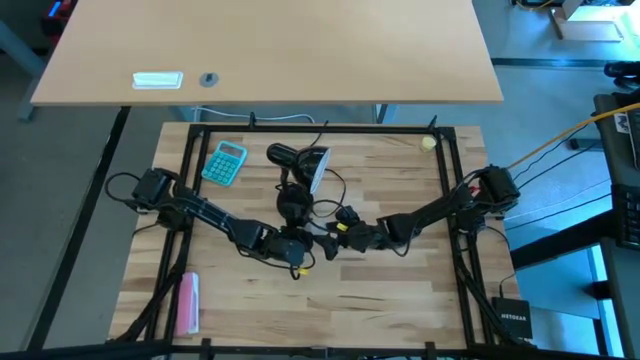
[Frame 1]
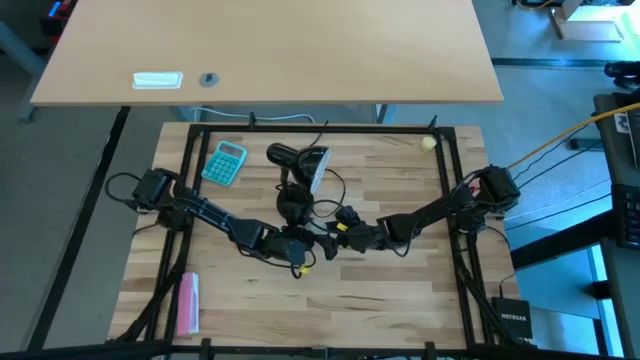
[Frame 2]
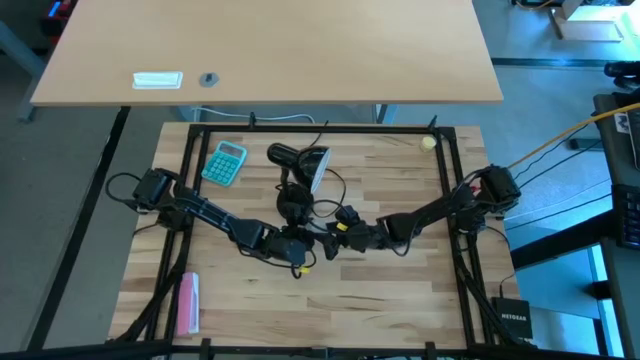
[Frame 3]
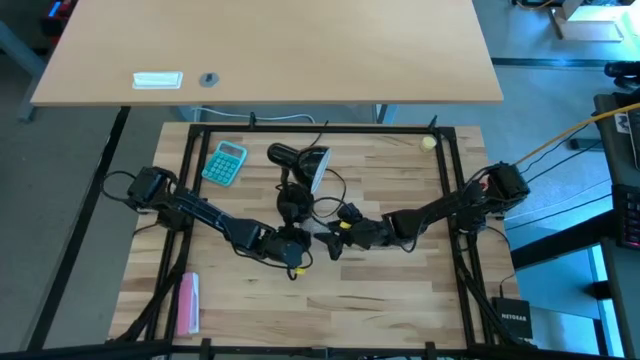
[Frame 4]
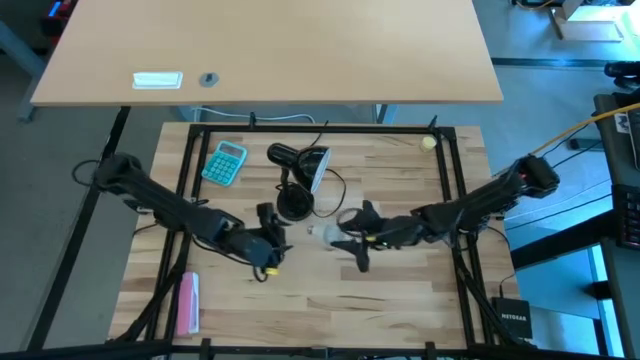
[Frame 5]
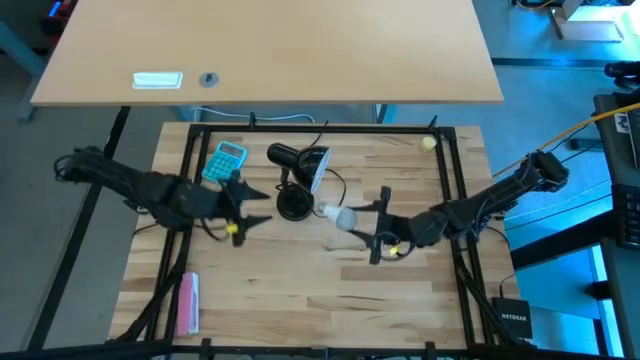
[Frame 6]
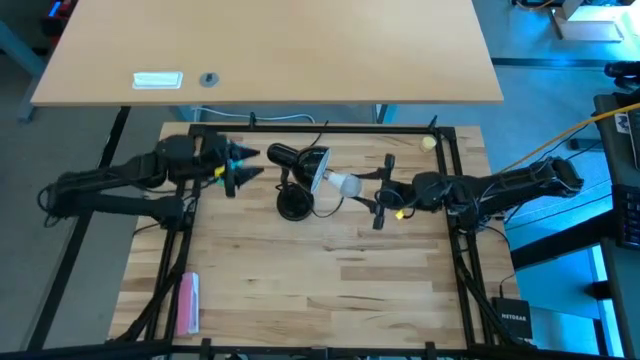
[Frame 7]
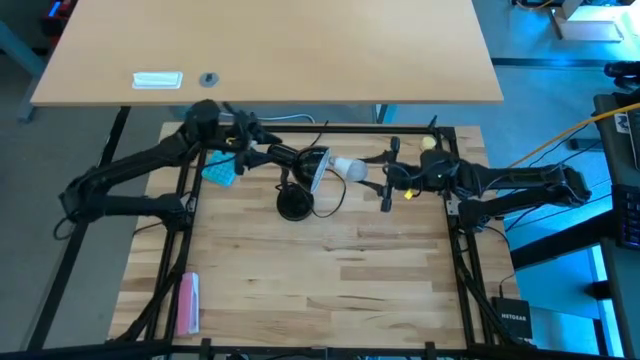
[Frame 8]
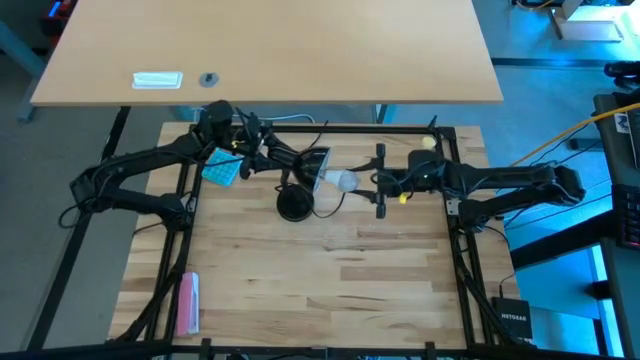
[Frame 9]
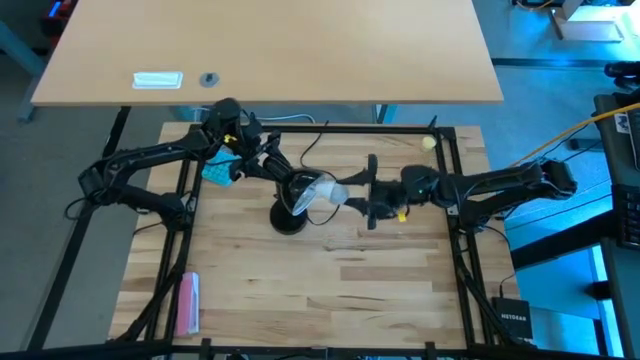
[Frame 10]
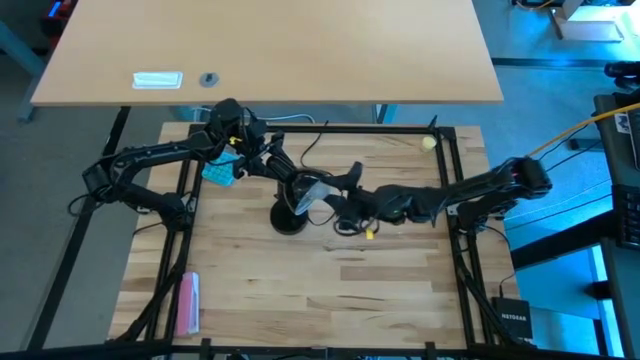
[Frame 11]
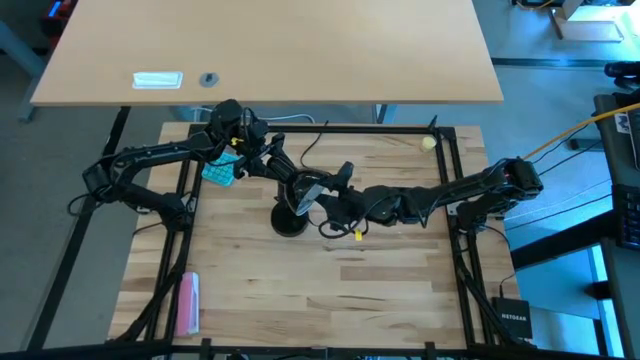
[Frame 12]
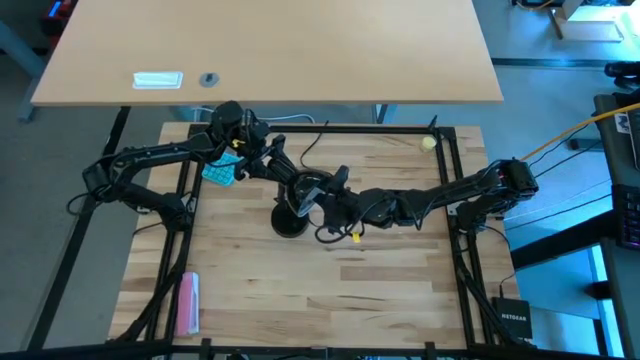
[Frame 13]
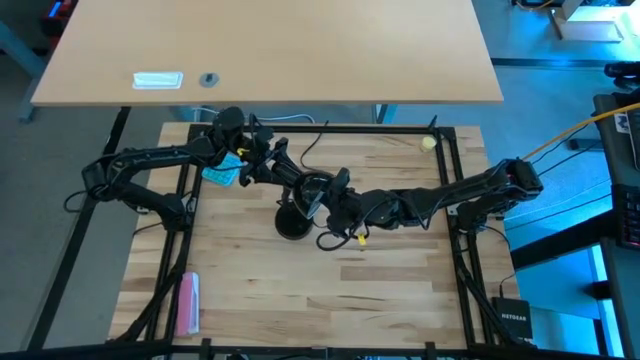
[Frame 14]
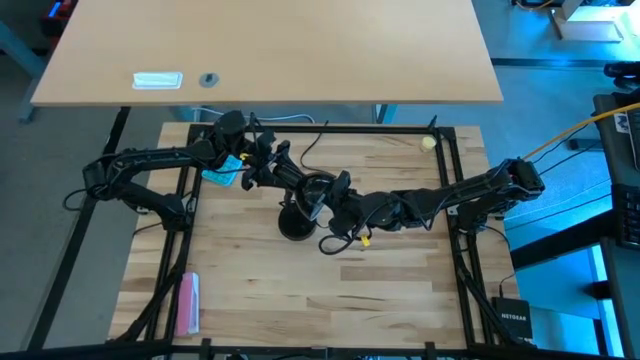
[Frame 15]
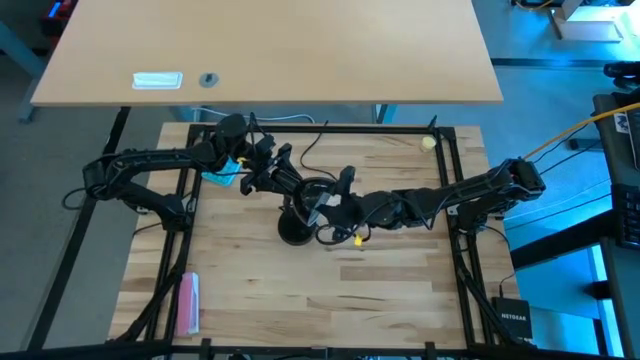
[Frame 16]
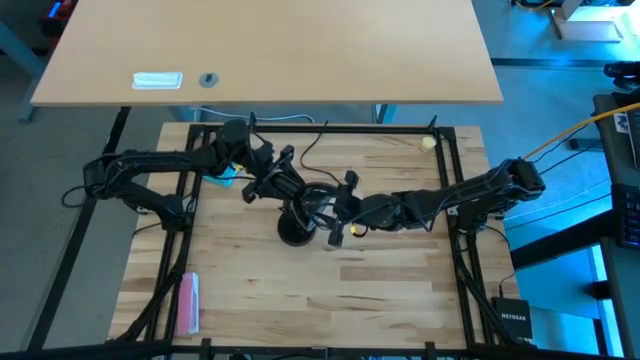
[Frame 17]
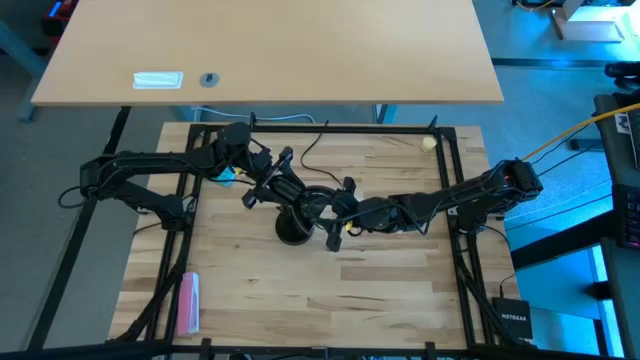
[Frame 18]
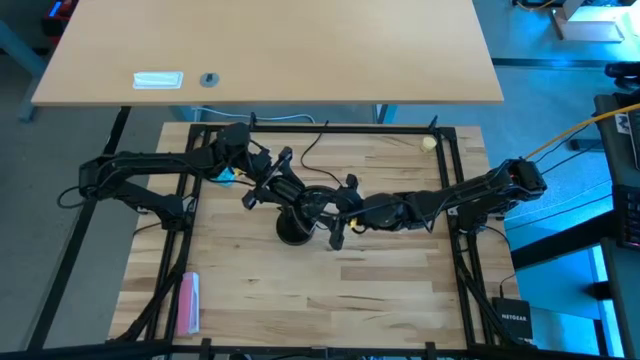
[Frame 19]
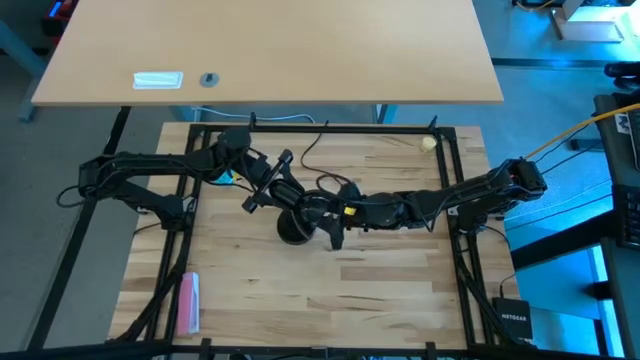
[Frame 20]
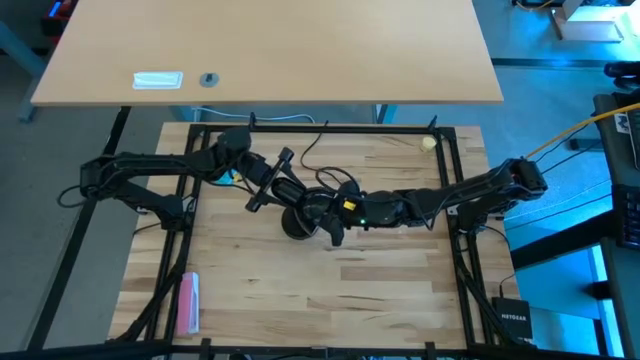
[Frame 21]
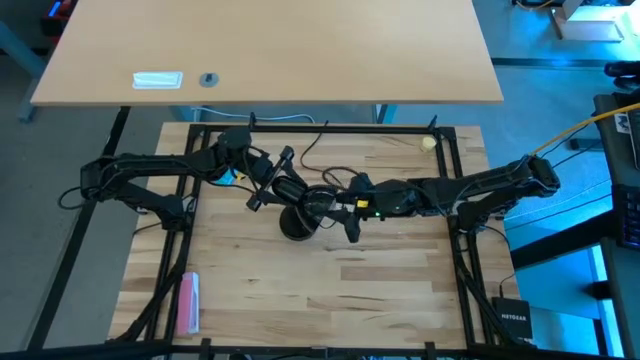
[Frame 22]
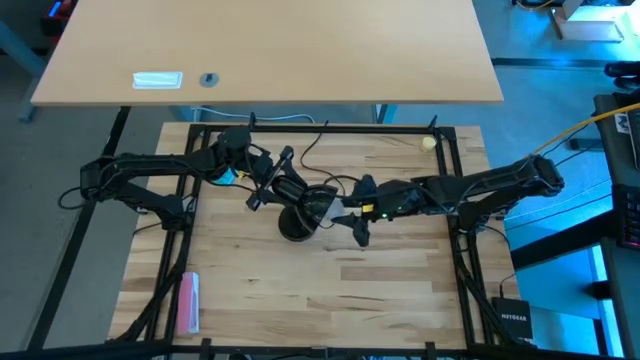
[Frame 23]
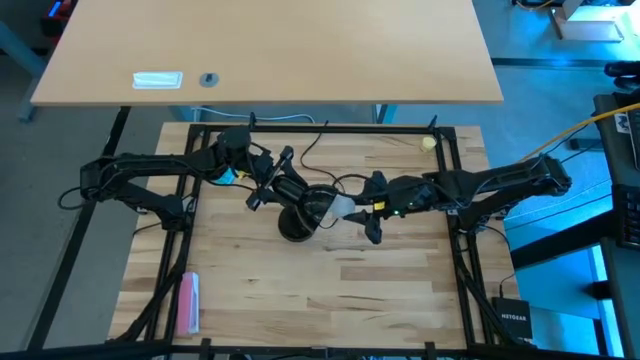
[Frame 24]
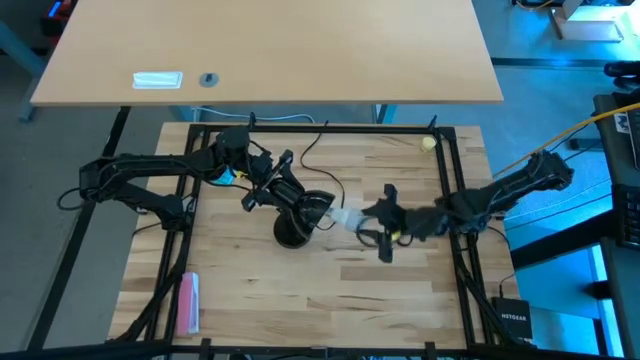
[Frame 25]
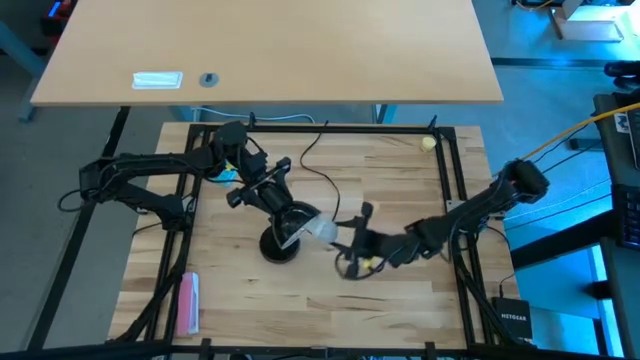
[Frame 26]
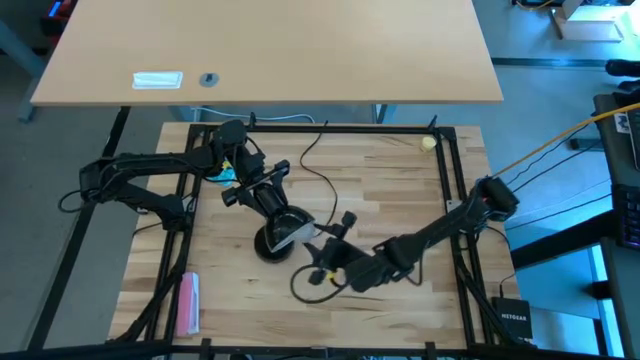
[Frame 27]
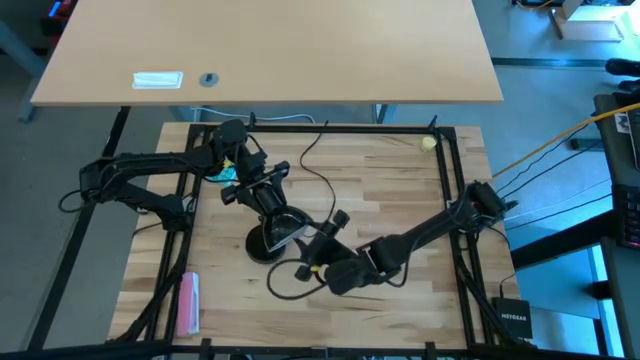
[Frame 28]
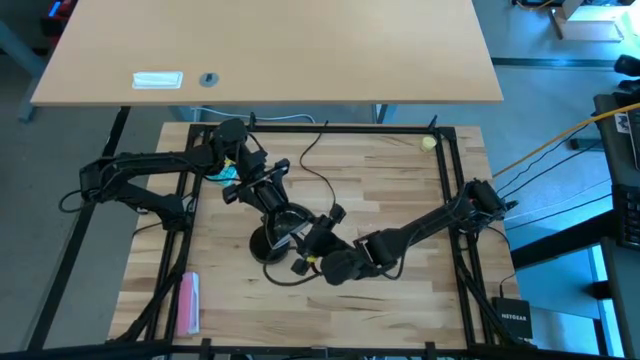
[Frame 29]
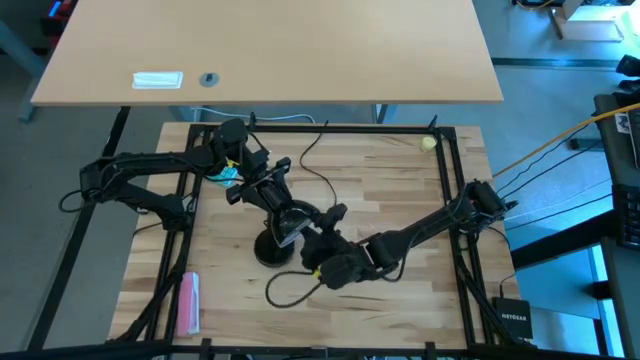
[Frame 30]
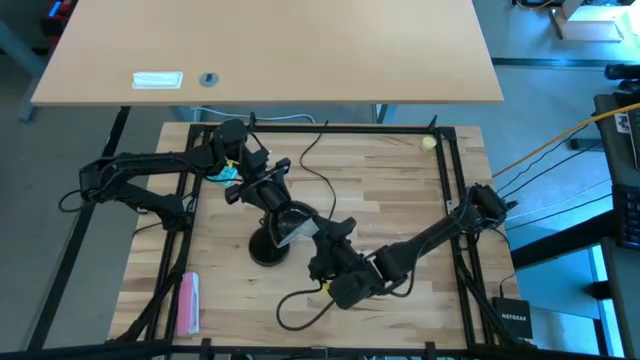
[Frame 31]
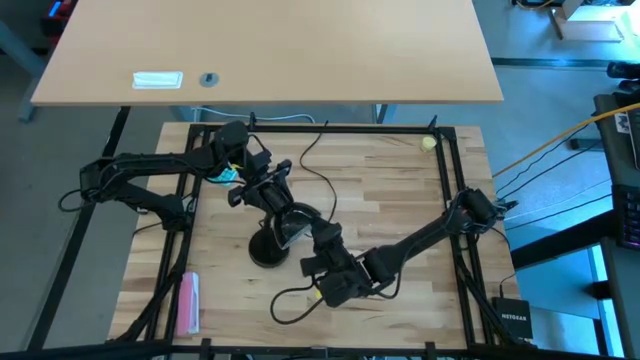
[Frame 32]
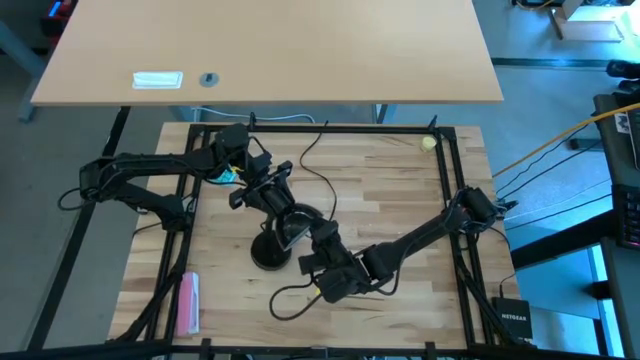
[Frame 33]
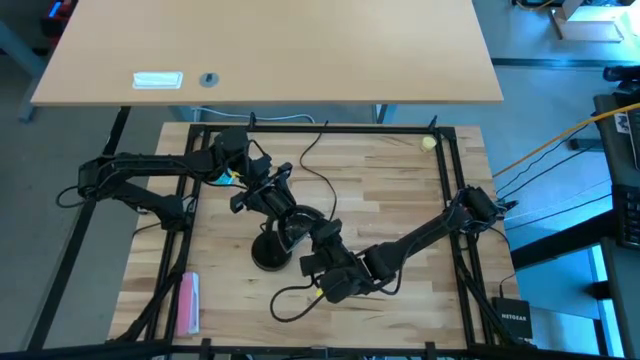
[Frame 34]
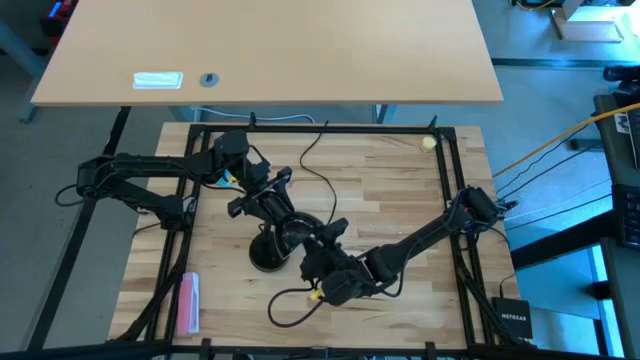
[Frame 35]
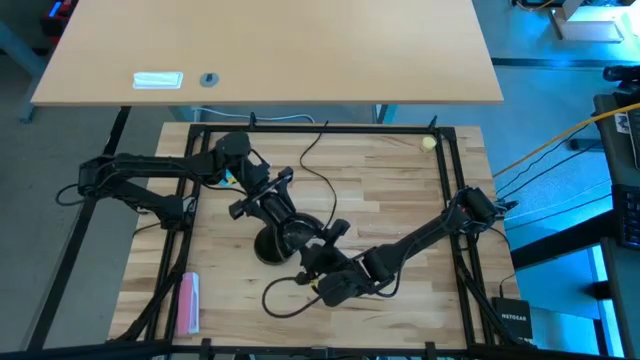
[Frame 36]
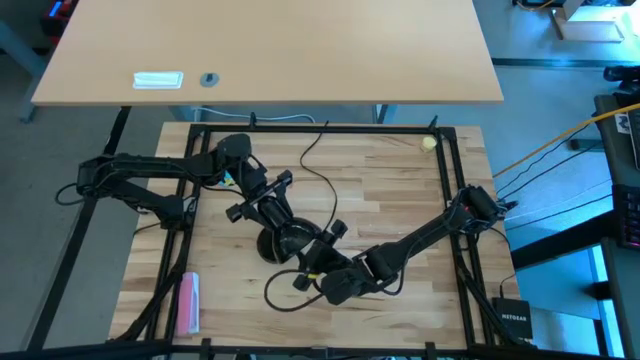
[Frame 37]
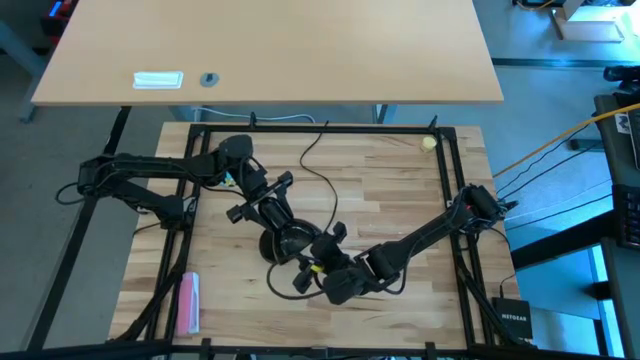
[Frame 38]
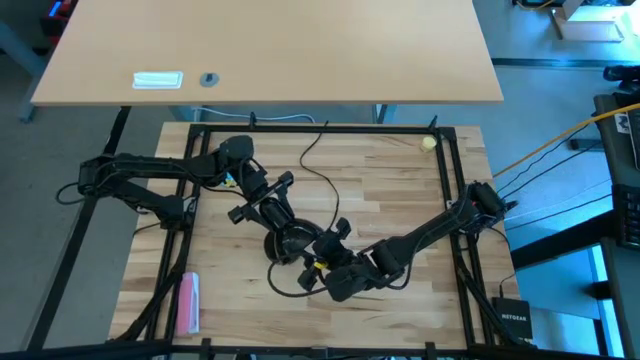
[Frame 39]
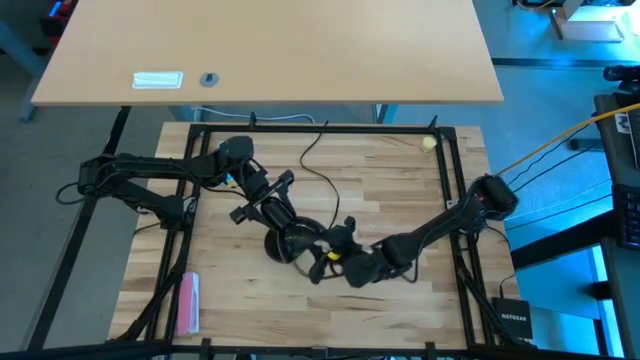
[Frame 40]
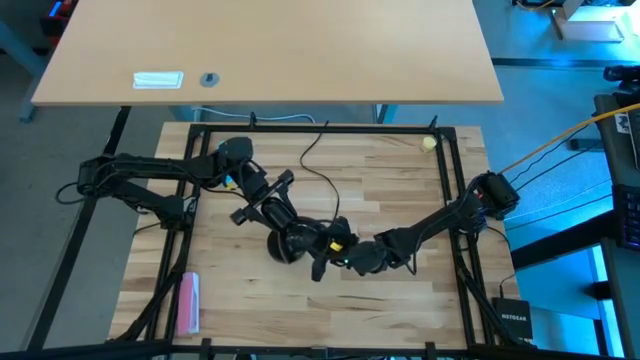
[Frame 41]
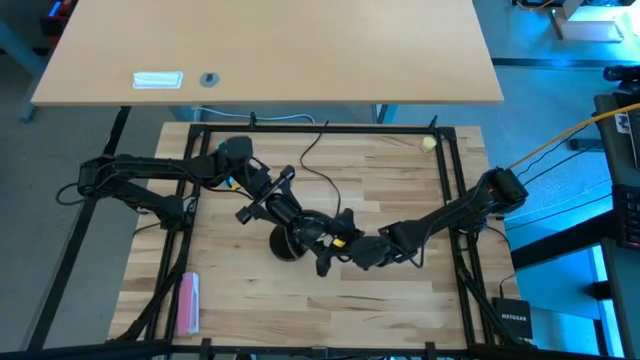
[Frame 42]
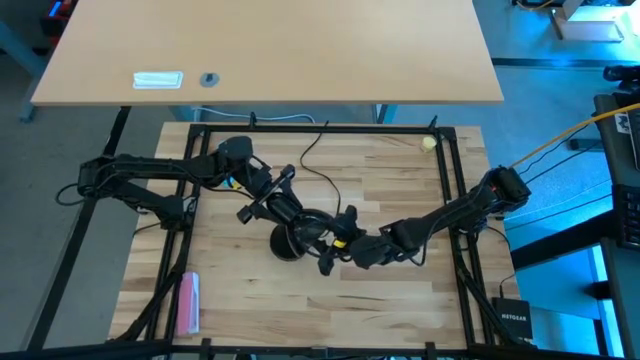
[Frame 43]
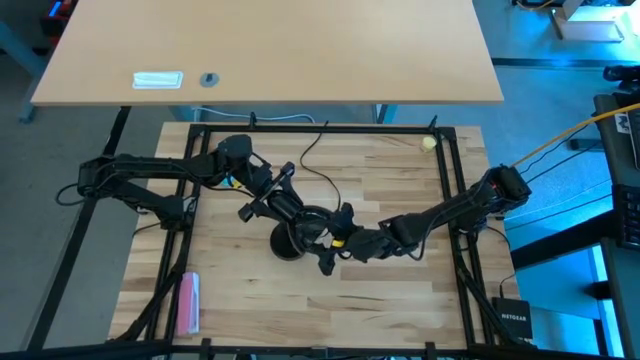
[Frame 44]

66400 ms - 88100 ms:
Task: Screw lightbulb
Insert the lightbulb into the black lamp
